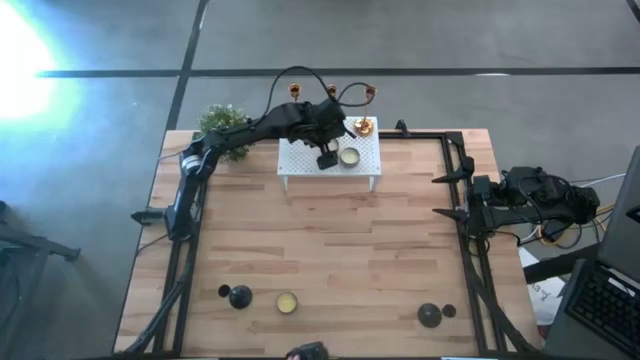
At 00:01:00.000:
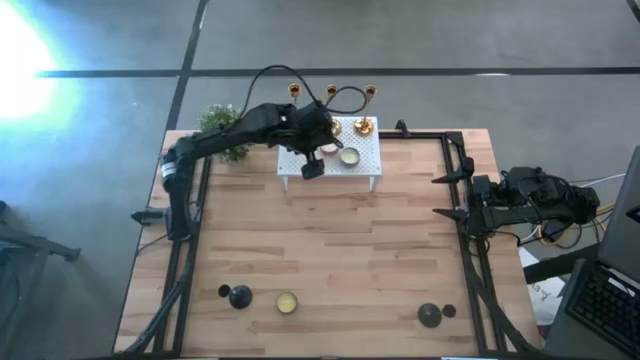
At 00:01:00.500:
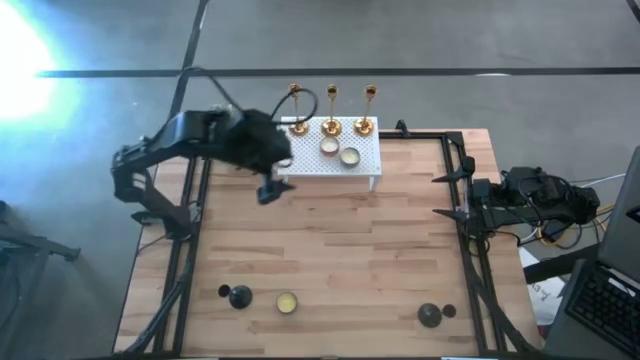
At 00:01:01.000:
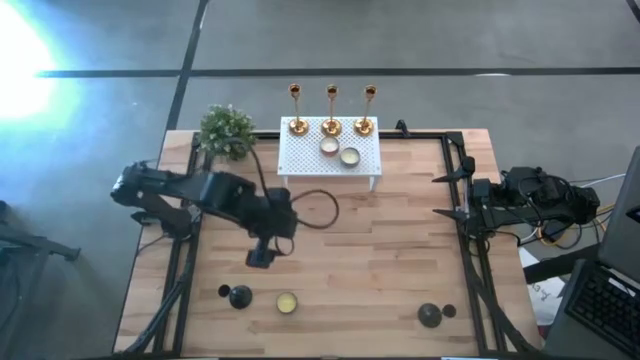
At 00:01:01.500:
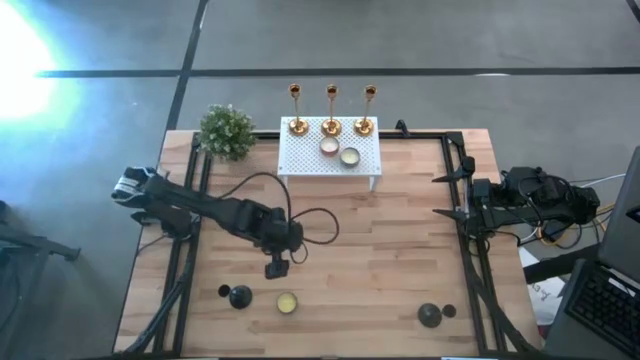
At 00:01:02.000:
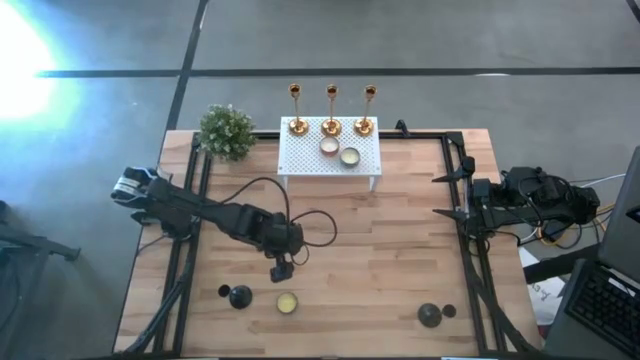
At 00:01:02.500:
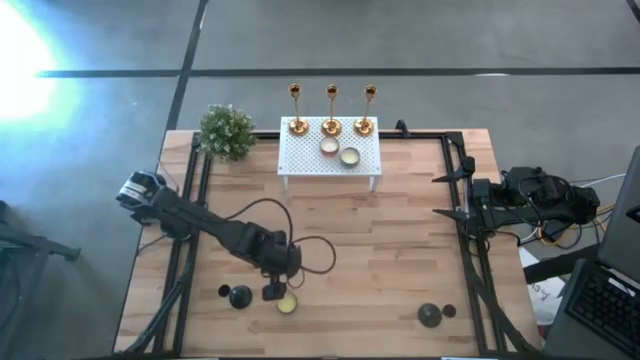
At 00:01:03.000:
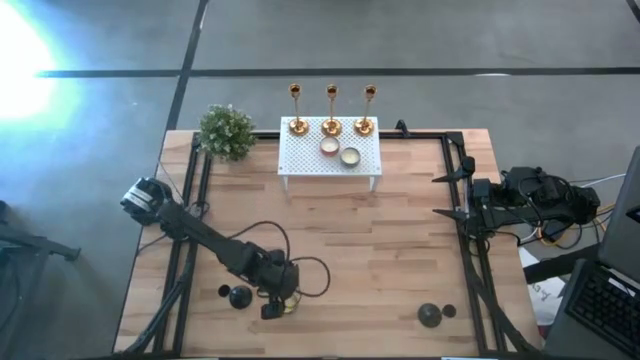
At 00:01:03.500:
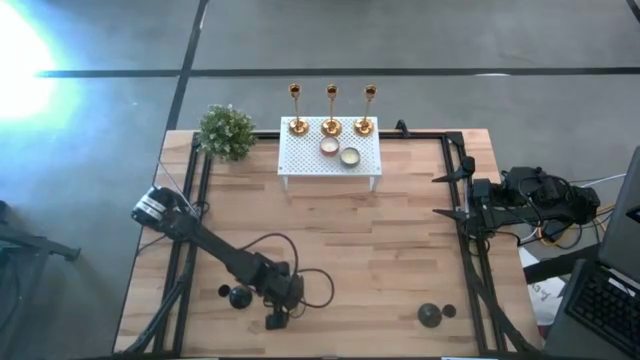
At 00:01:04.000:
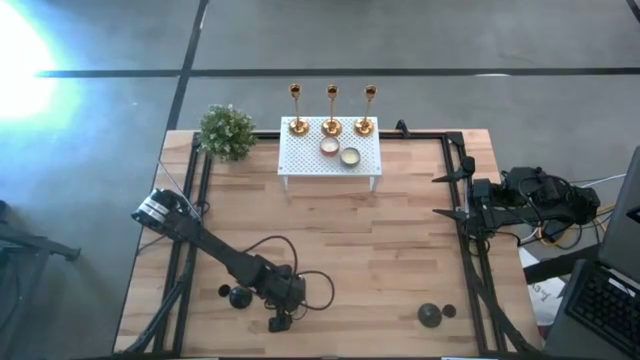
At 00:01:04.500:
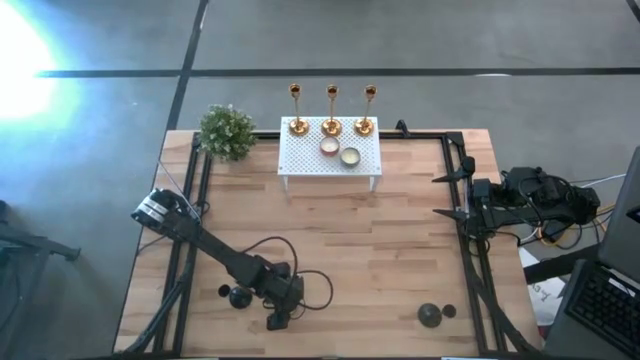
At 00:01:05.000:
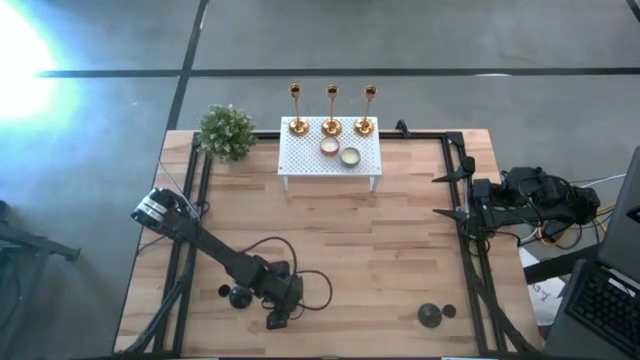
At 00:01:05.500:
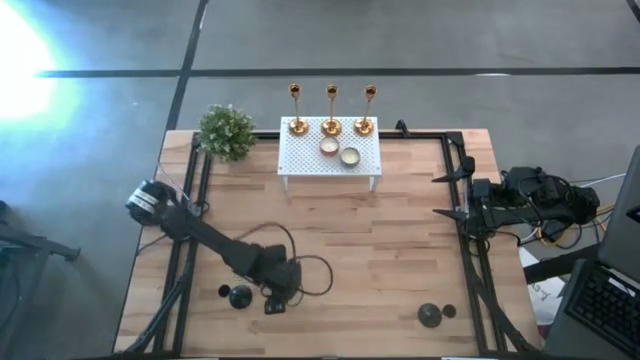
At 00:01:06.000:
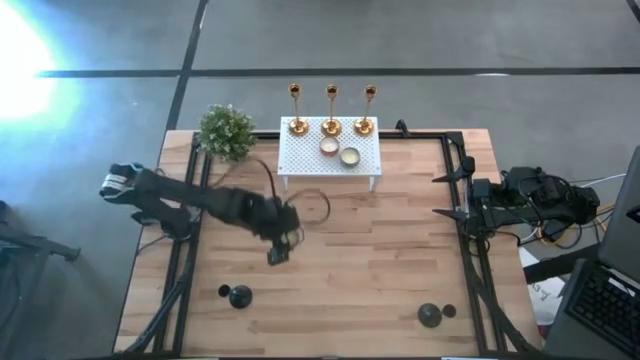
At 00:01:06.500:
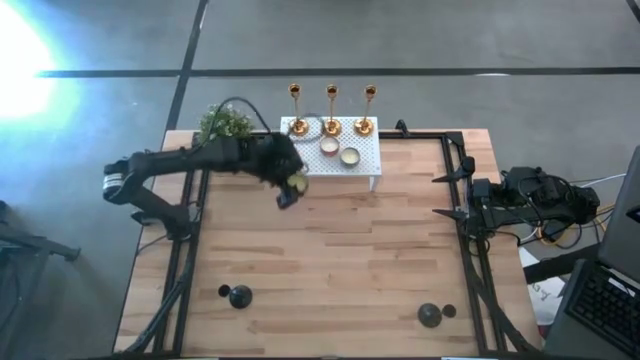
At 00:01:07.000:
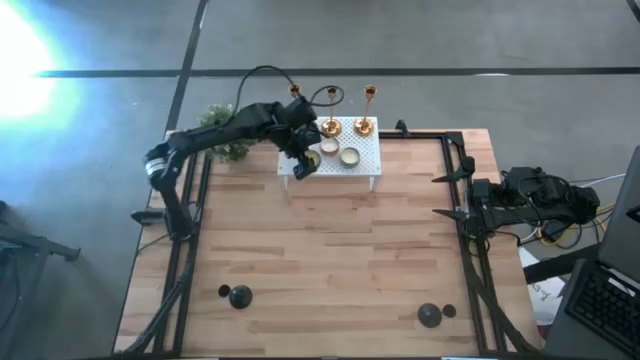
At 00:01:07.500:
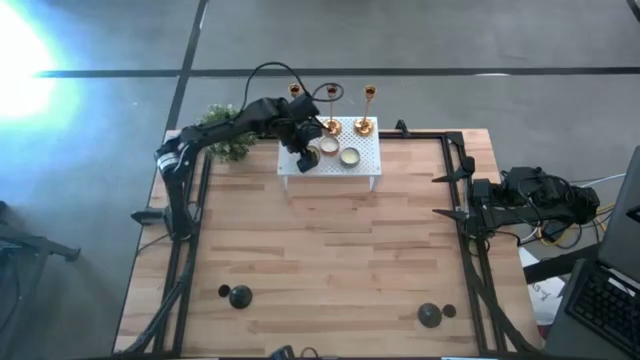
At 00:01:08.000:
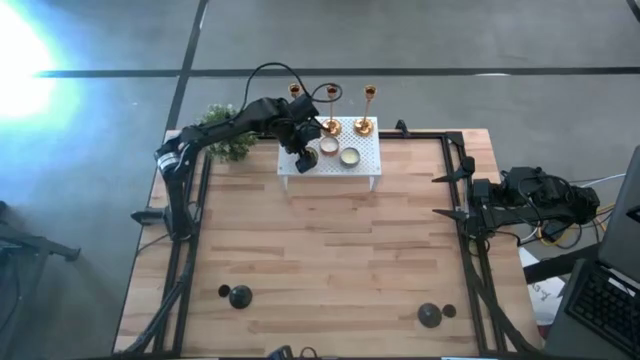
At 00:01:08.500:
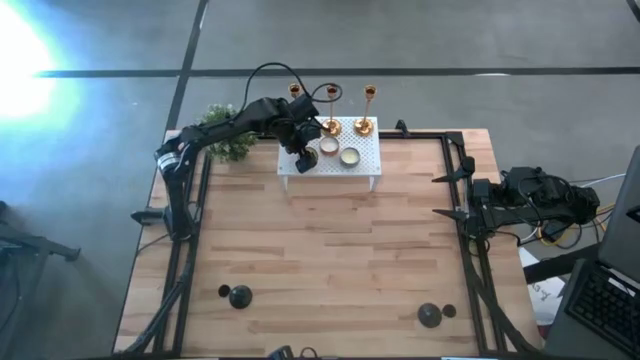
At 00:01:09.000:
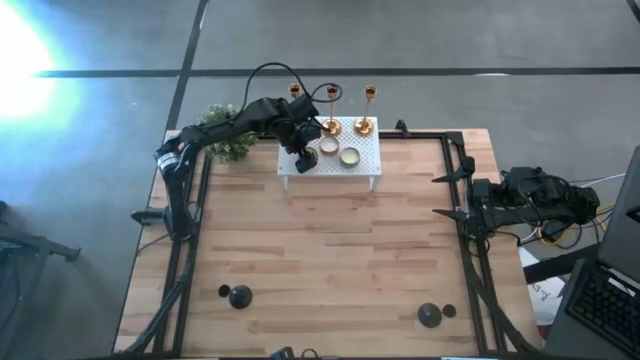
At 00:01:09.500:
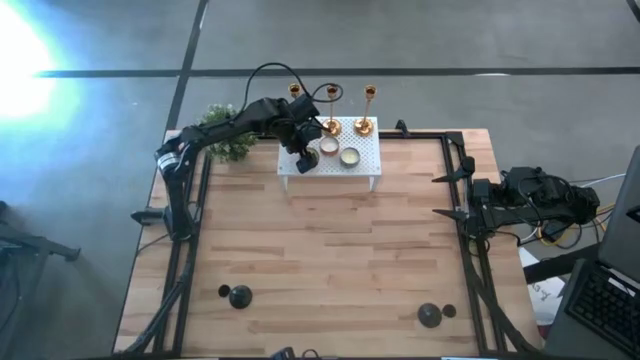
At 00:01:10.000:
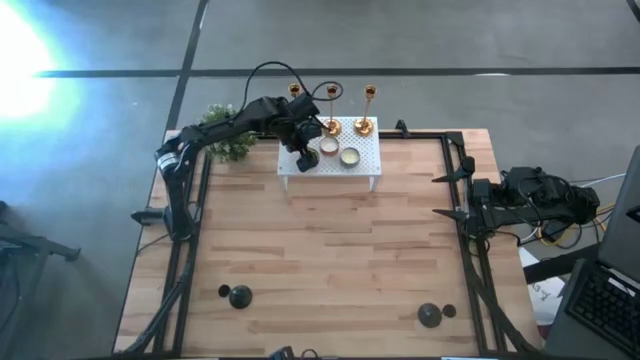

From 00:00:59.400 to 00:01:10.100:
Task: Pick & Place candle stick holders
Put the yellow scented candle on the shelf aligned with the other scented candles

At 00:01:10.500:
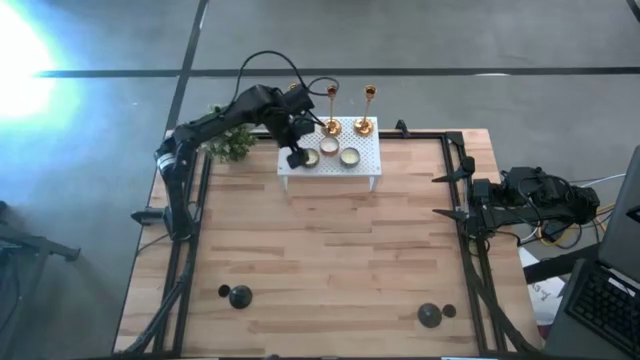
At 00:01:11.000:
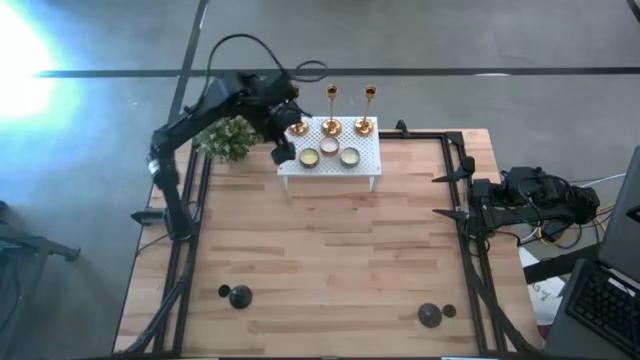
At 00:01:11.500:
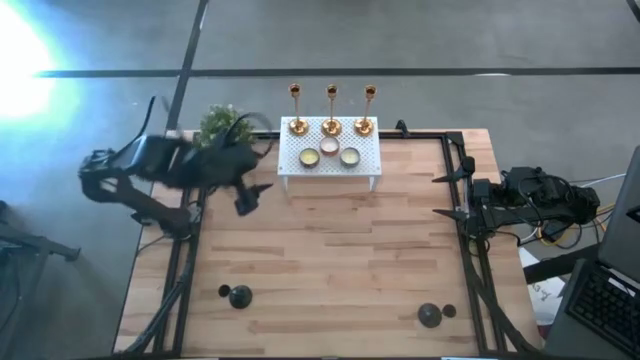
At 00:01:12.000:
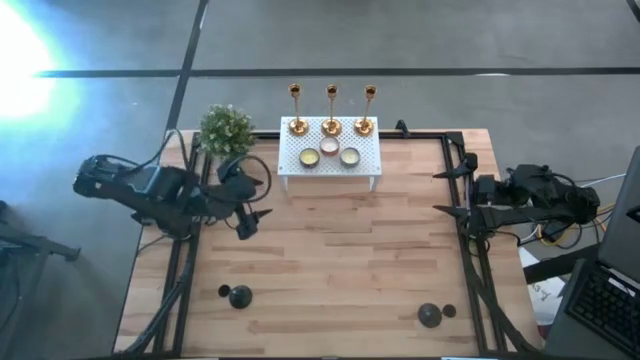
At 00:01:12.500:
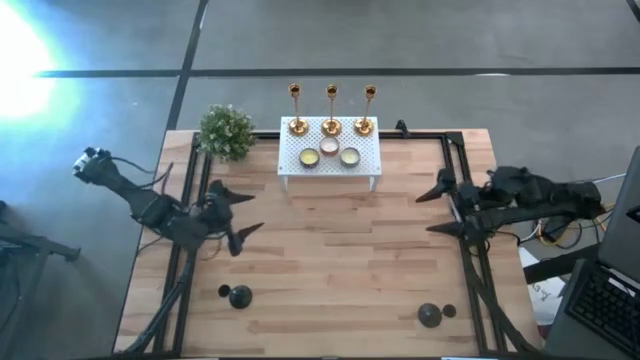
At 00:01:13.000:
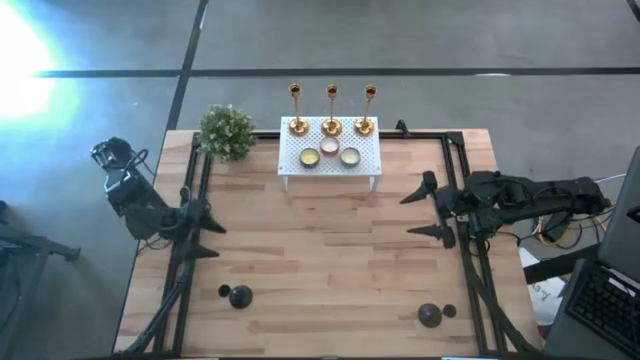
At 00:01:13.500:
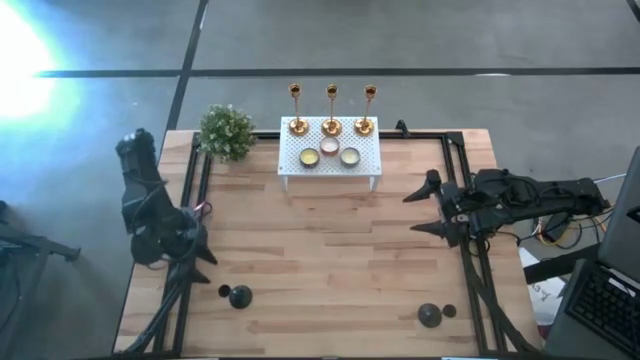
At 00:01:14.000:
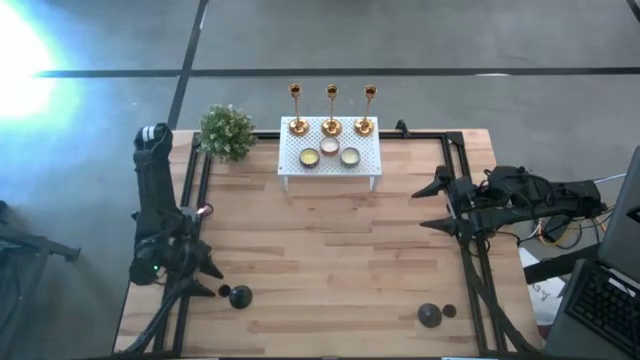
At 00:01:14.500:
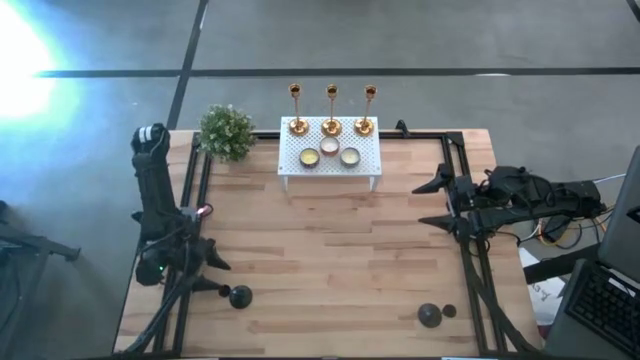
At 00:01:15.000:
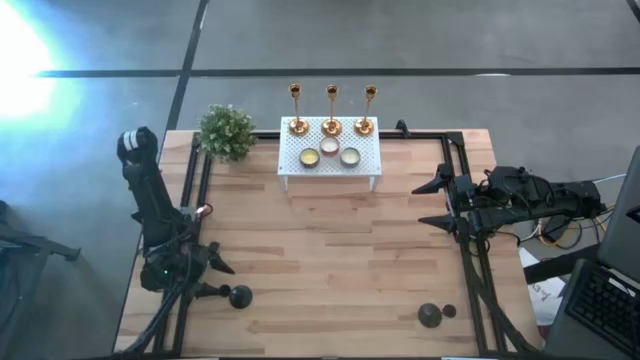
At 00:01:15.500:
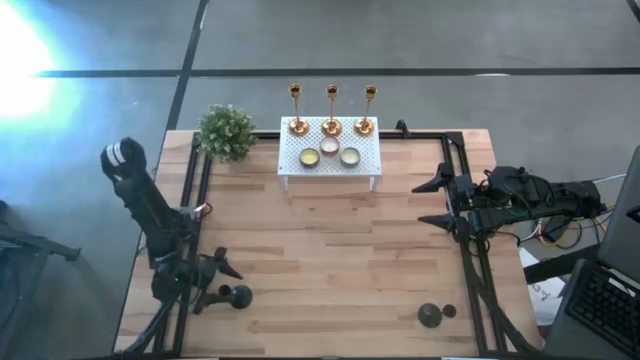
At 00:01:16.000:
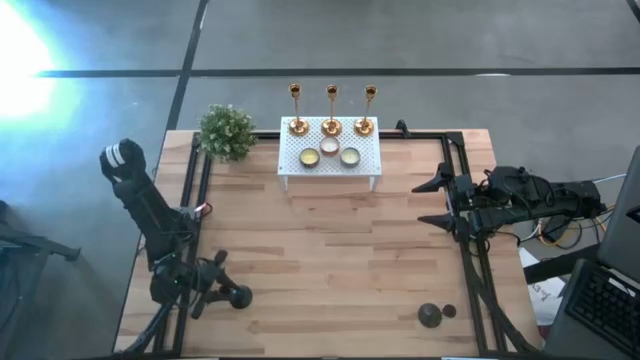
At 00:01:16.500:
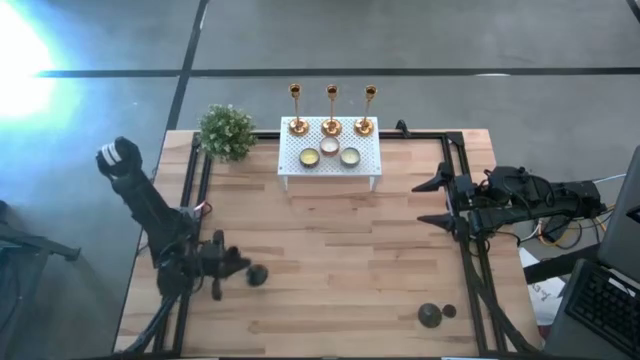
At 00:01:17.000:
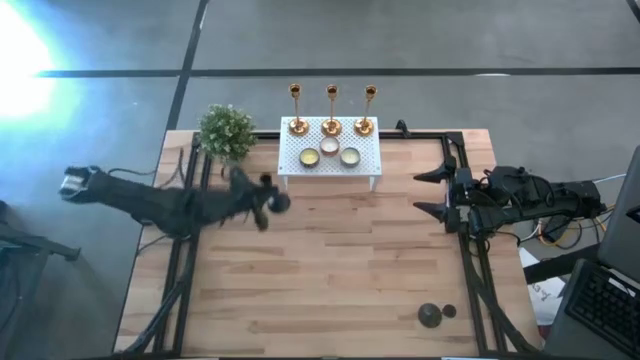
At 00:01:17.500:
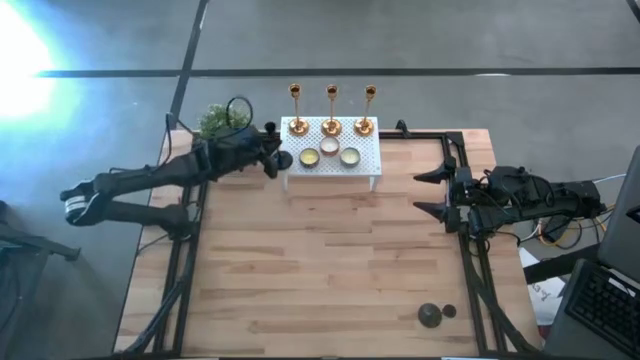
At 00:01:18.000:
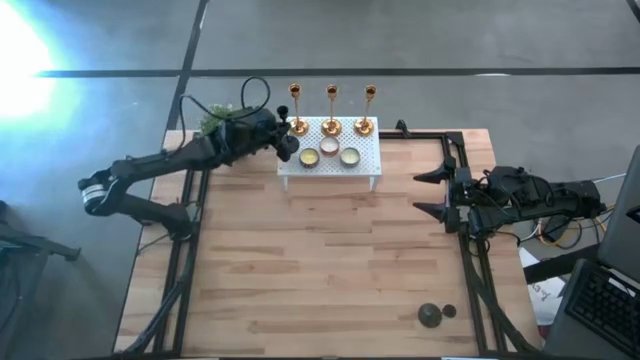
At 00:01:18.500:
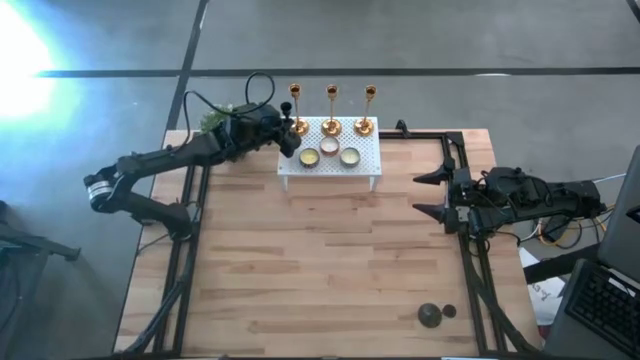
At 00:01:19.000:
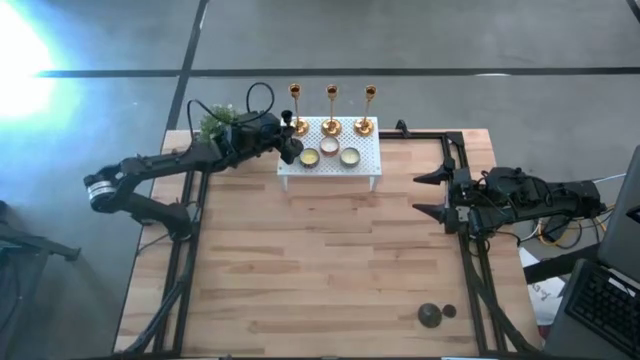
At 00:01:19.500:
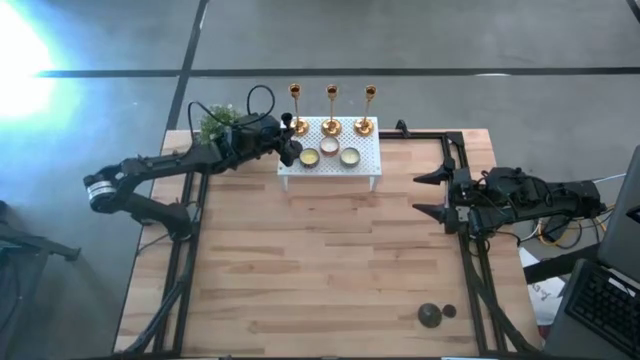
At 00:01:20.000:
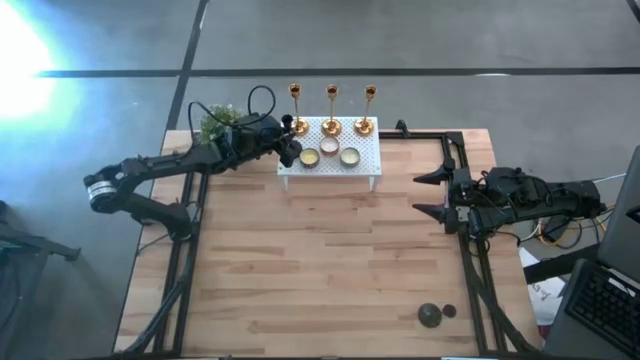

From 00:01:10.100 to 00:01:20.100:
Put the left black candle holder on the shelf
